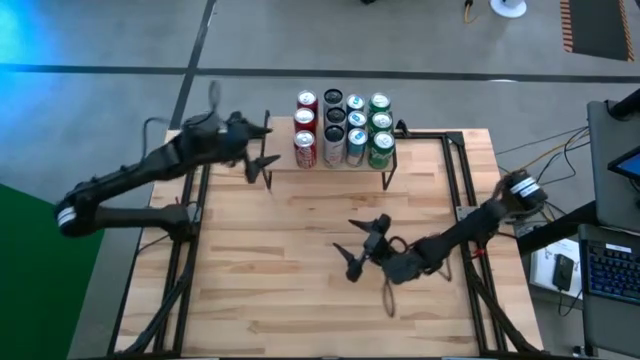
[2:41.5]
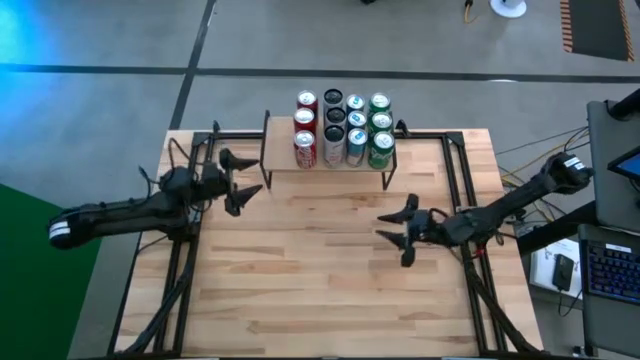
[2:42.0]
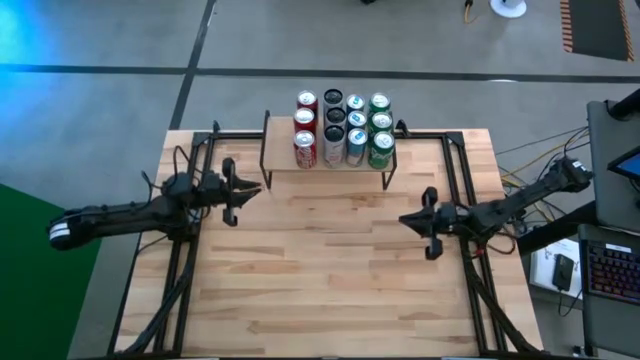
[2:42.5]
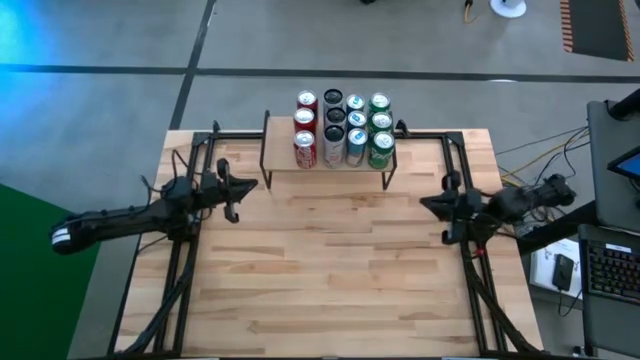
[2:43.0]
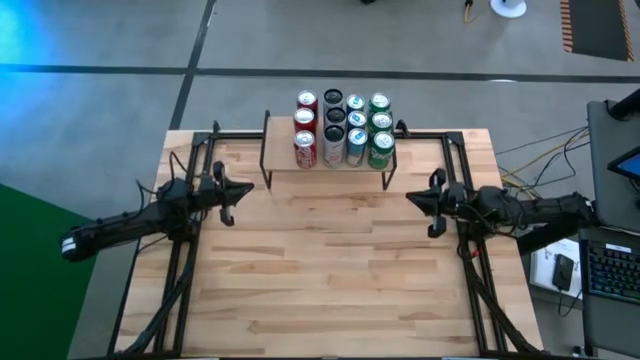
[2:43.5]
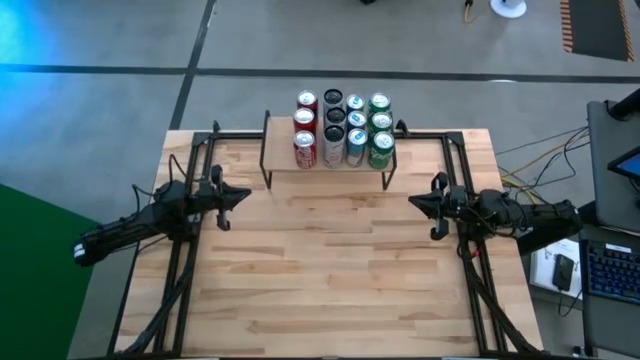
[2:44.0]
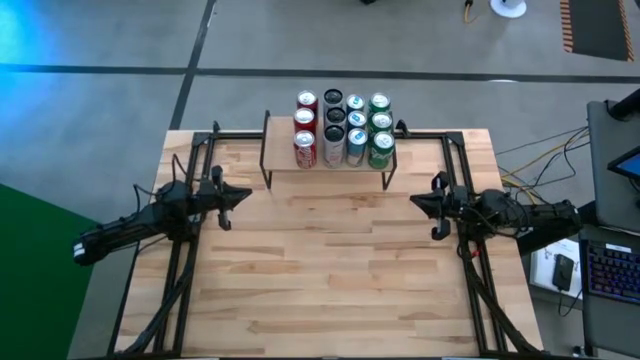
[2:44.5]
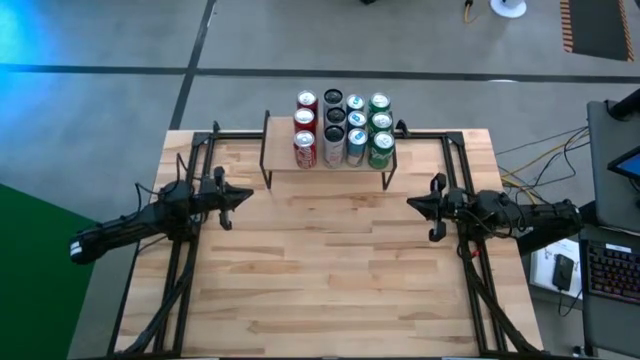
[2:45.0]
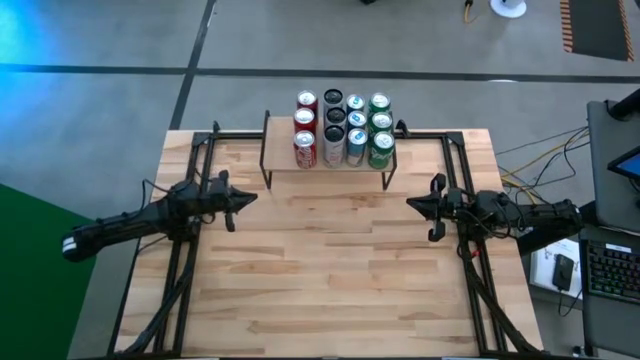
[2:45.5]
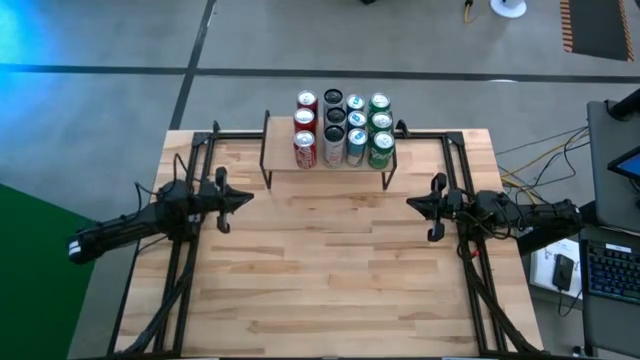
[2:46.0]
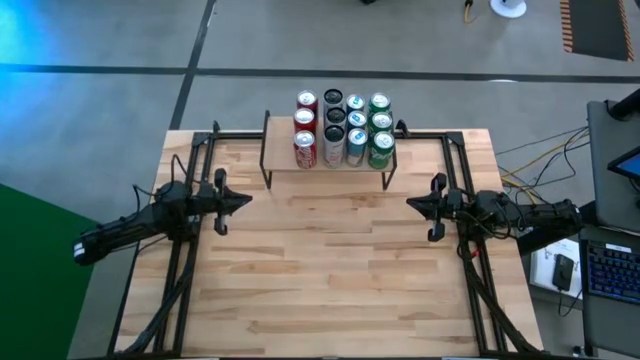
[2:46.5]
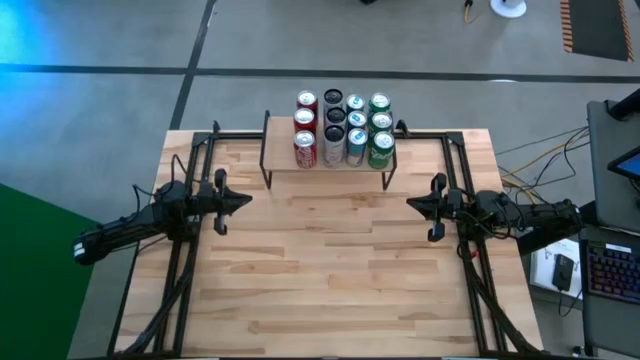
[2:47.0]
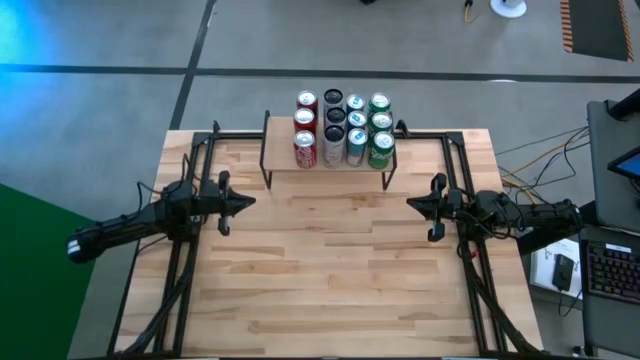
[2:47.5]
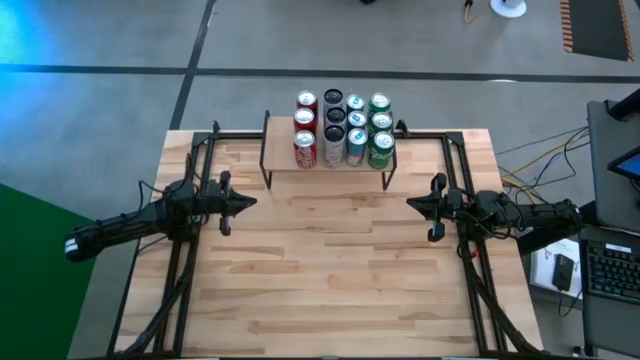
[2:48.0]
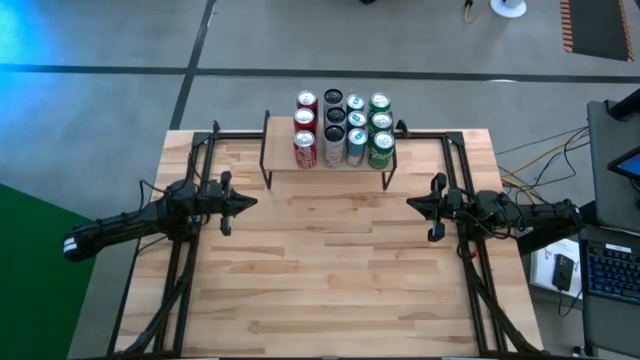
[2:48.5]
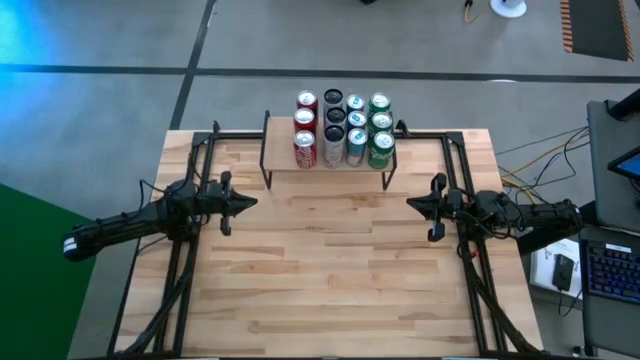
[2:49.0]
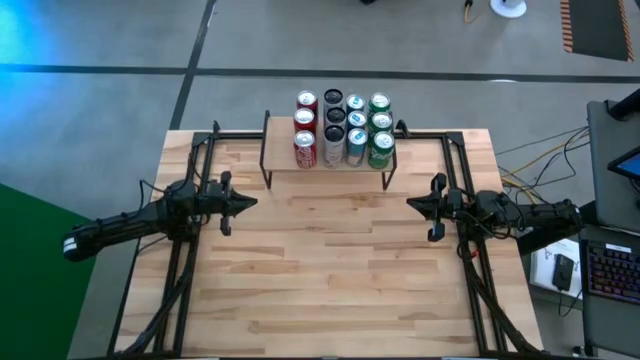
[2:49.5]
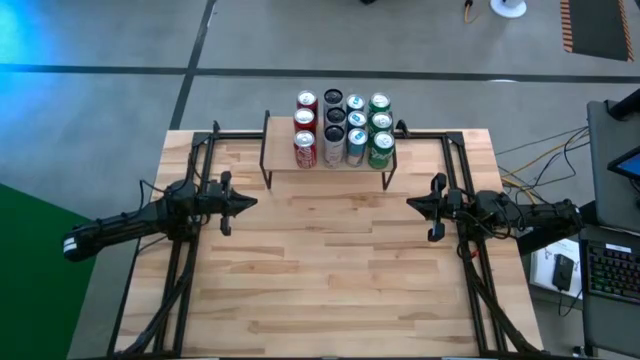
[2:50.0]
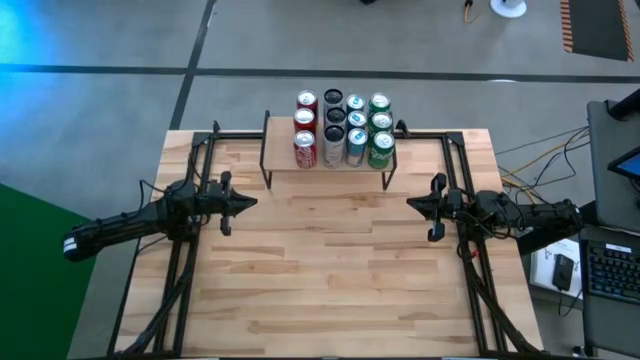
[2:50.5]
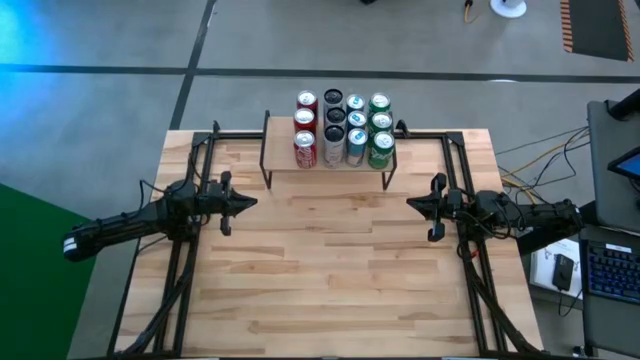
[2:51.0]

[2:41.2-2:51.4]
Task: Place canned beverage on shelf
Return to Home Position

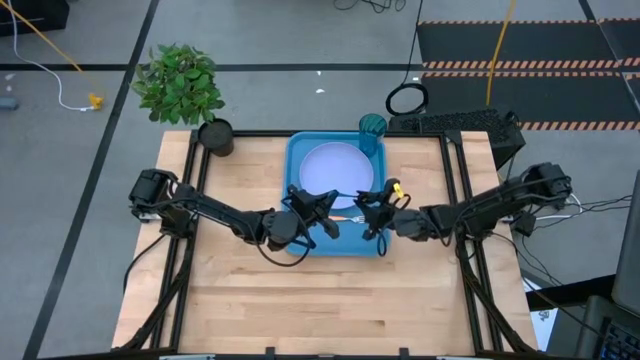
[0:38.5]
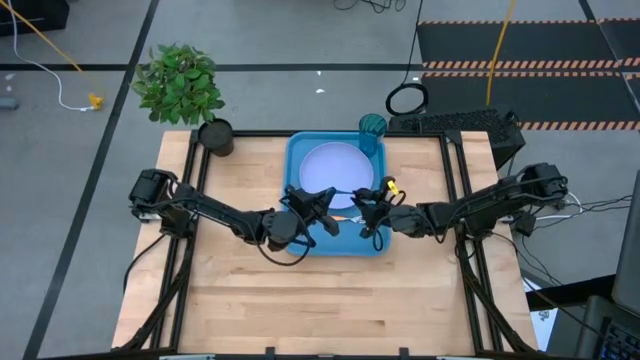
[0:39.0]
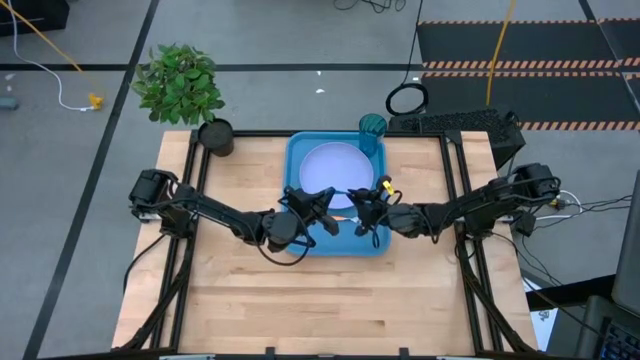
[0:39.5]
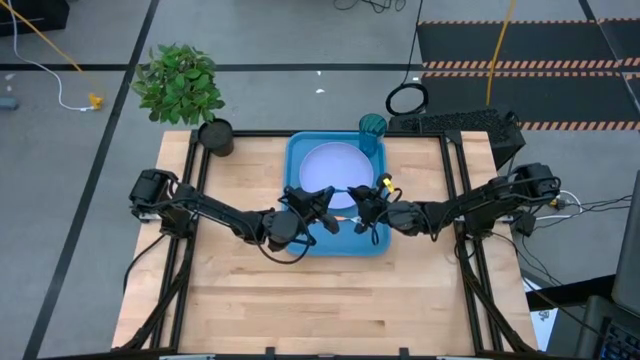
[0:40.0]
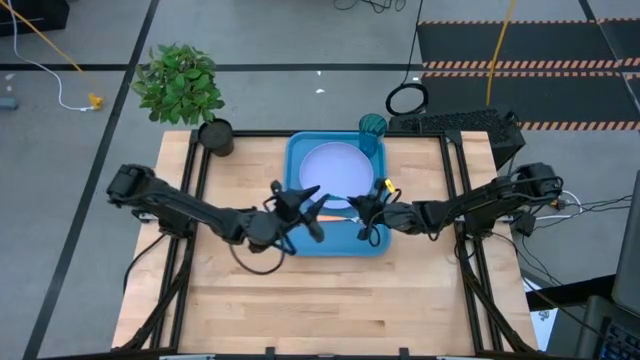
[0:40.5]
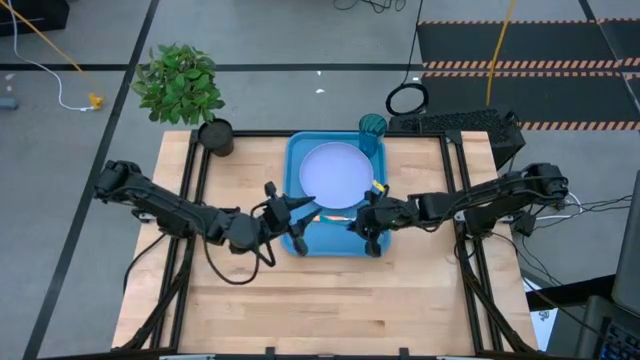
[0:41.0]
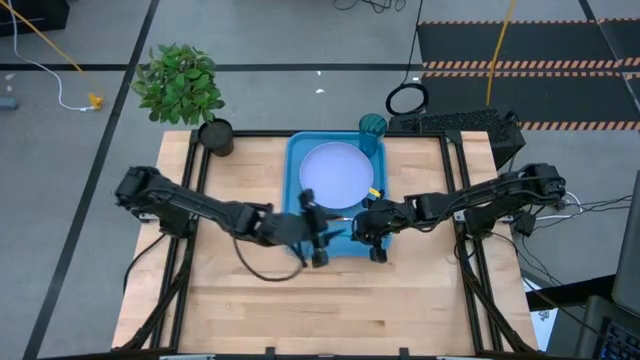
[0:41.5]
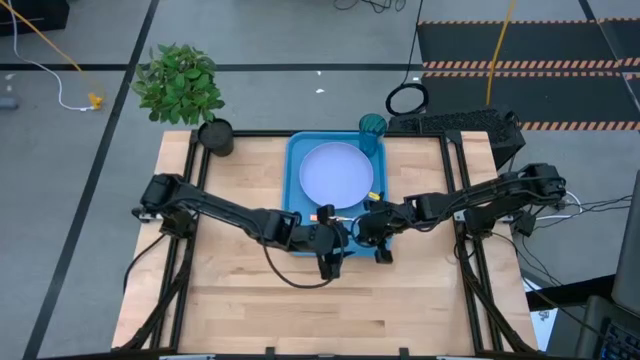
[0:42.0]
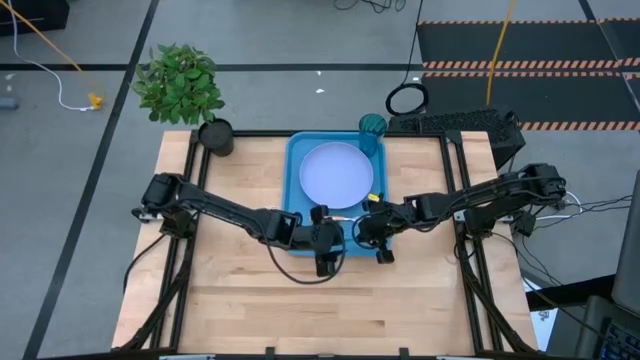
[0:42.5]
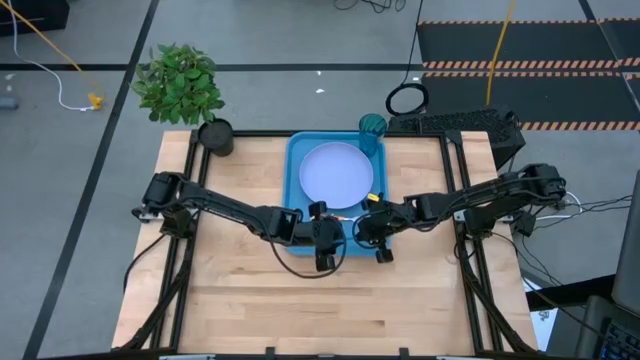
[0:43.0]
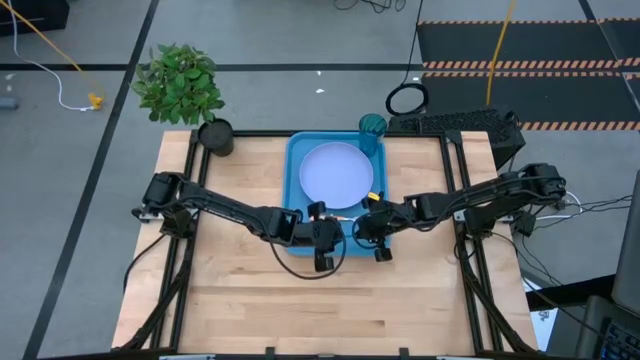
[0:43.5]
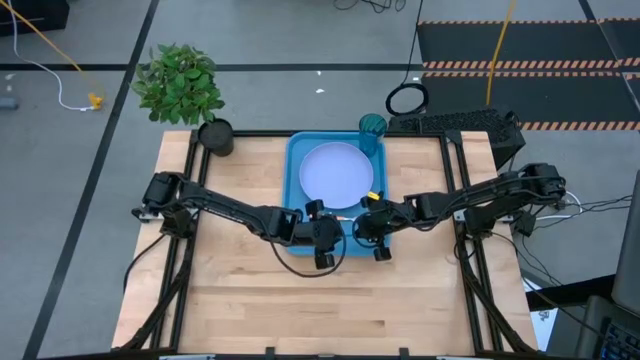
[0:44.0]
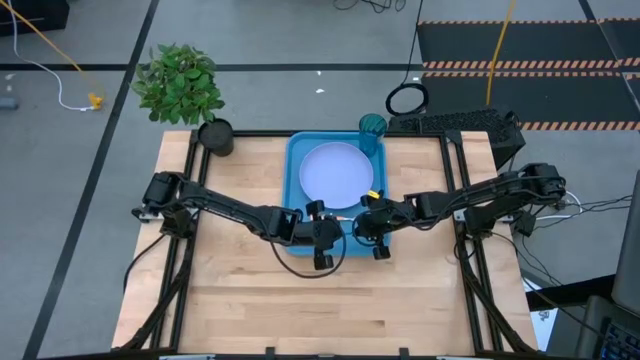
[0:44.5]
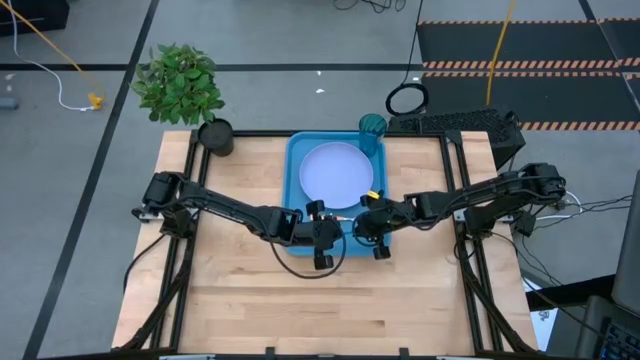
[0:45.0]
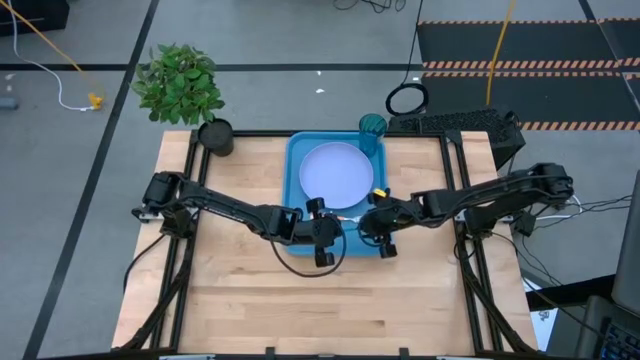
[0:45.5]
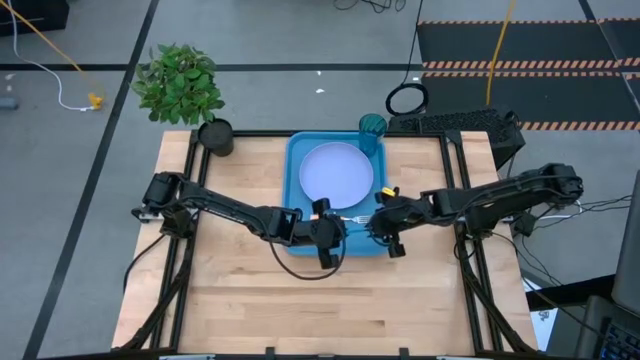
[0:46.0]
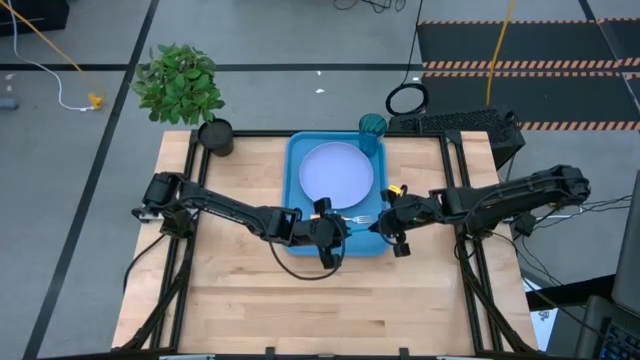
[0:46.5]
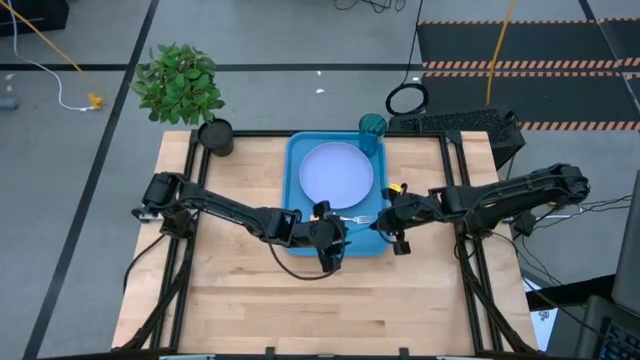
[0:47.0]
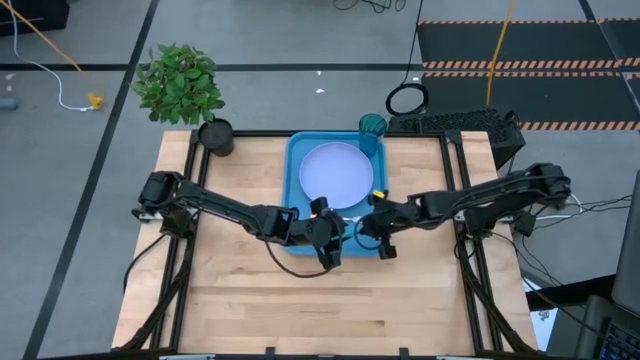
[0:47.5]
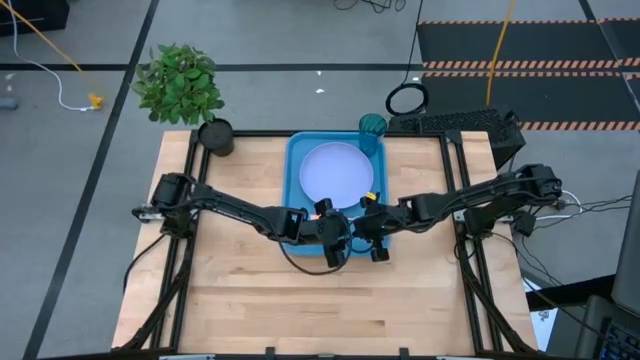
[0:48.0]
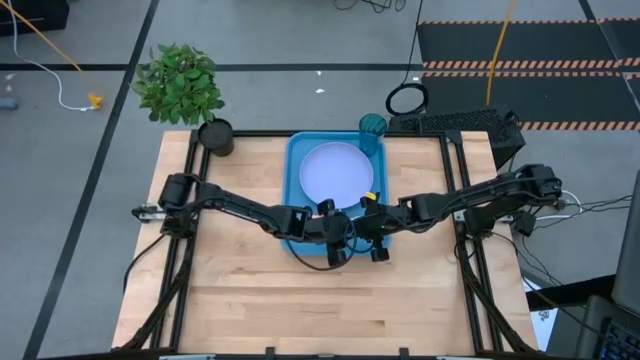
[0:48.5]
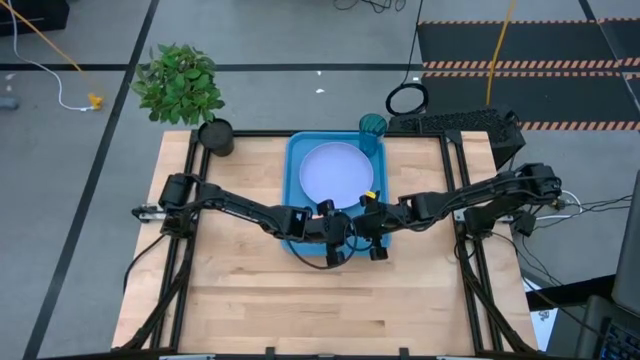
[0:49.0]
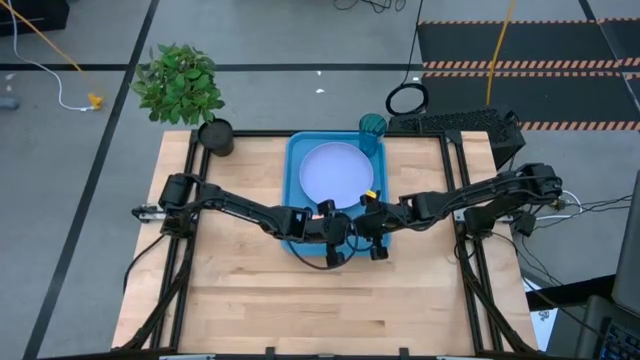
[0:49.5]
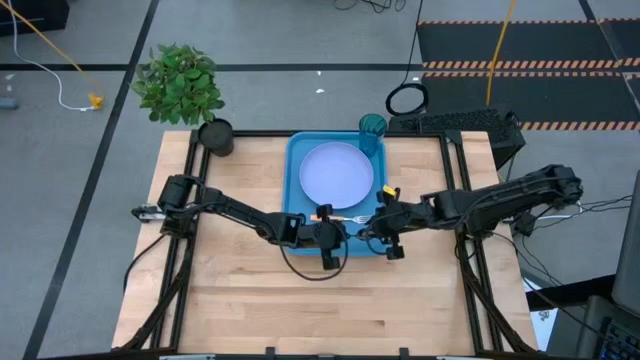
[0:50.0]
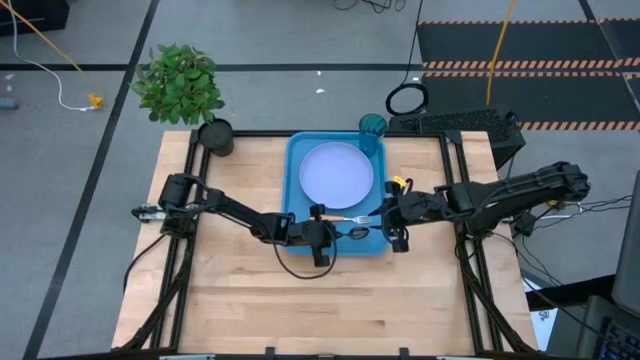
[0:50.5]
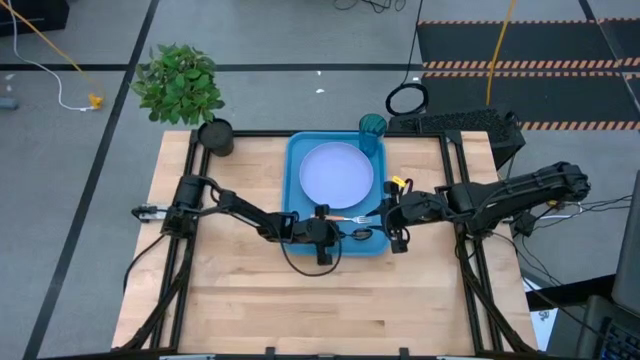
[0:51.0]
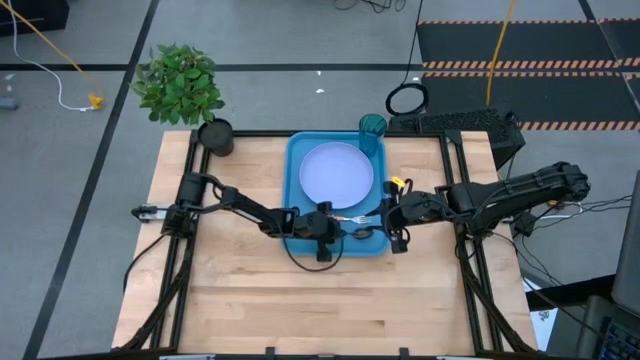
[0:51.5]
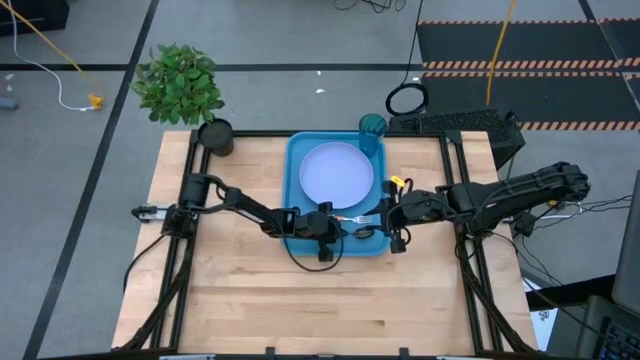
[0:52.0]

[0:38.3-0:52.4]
Task: Pick and place plate/cup/fork/spoon on tray
Put the blue spoon on the blue serving tray to the right of the orange fork
